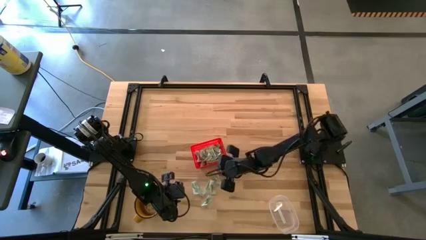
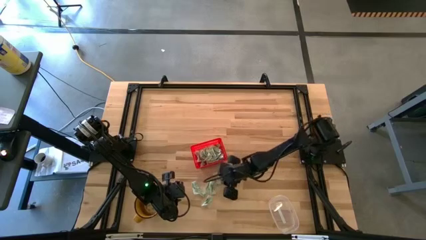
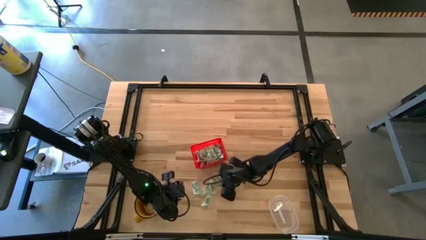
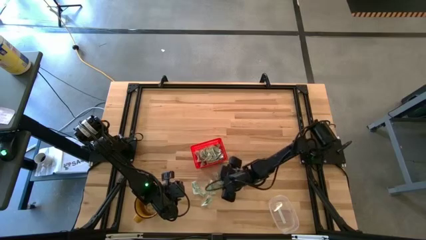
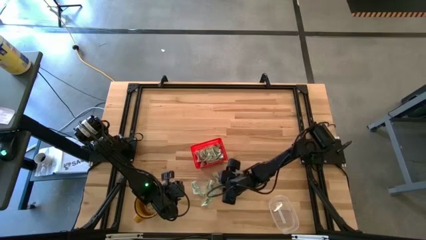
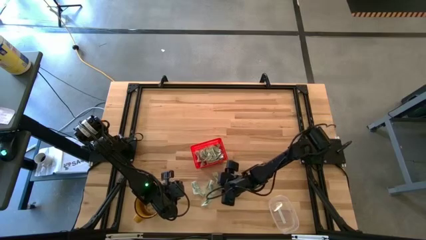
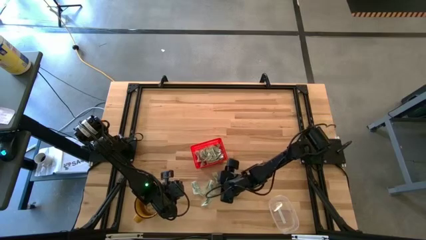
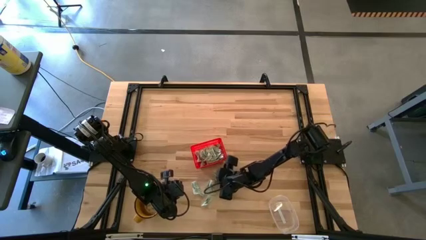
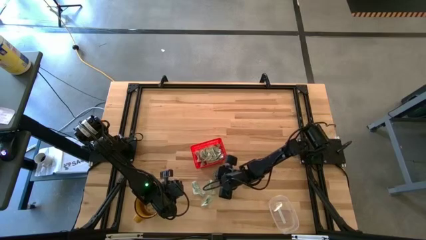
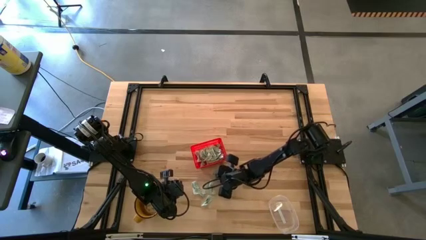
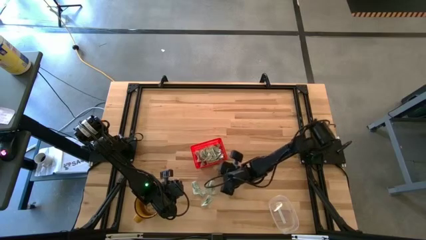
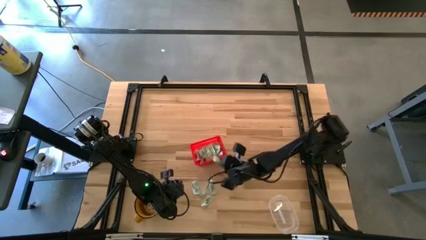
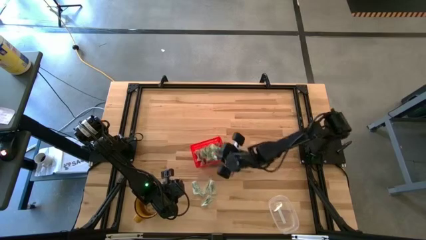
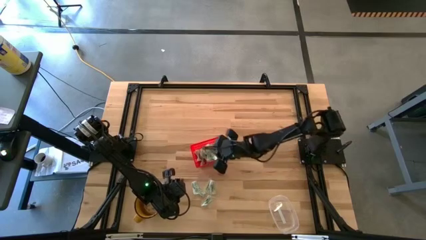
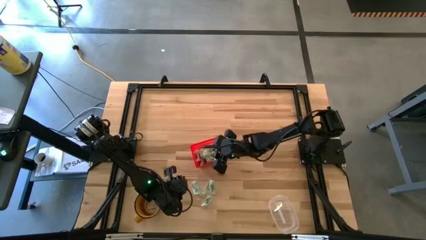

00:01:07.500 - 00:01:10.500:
Task: Pick and place Stevia / Truvia into bins
Put the stevia packet into the orange basket

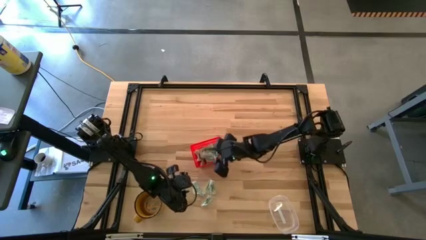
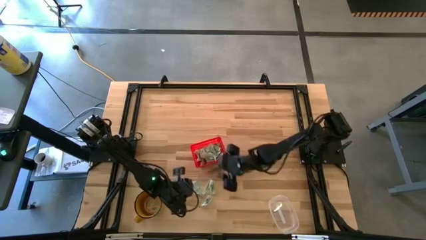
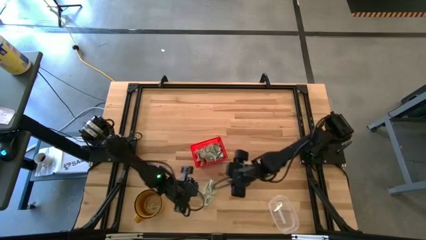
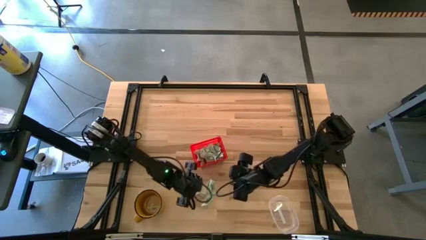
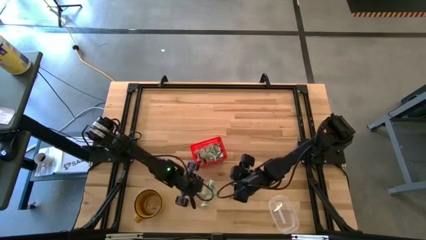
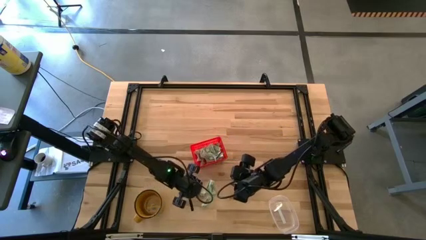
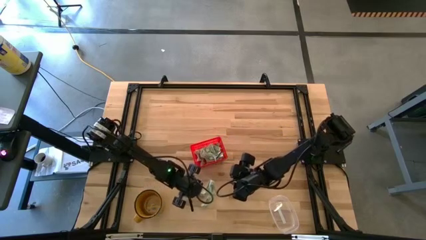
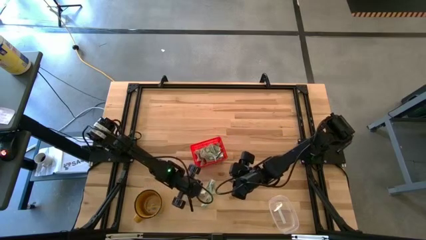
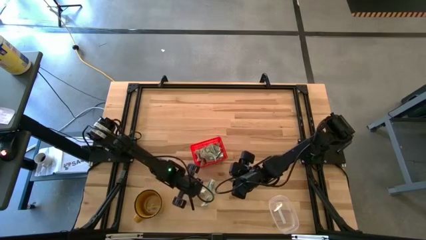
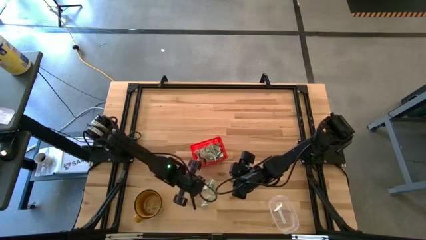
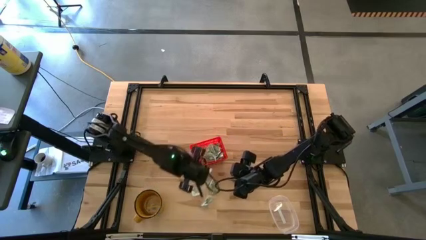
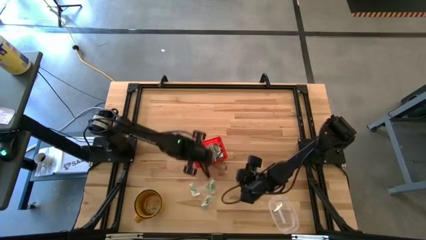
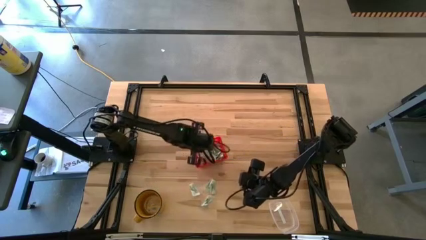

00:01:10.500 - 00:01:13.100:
Put the stevia packet into the orange basket

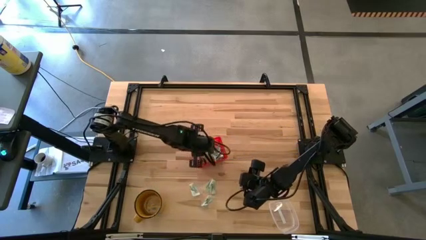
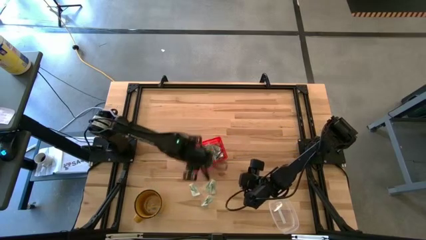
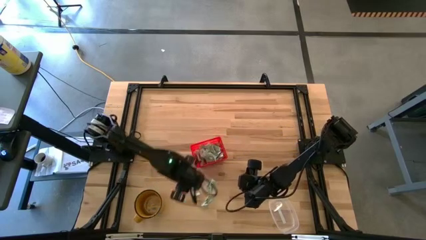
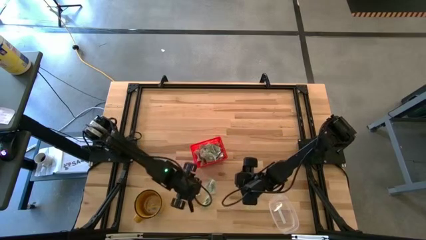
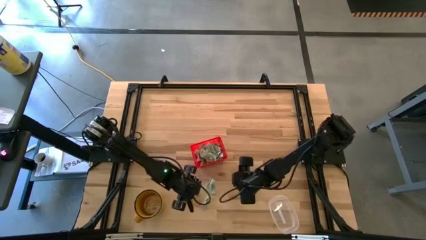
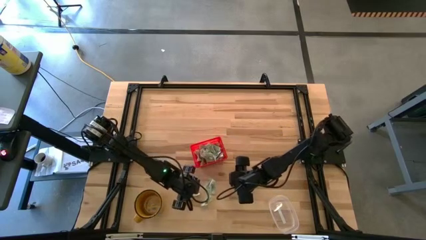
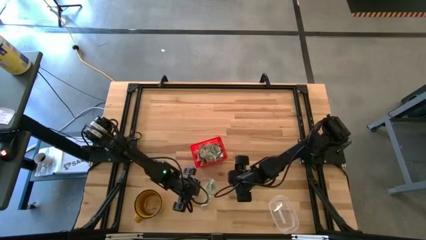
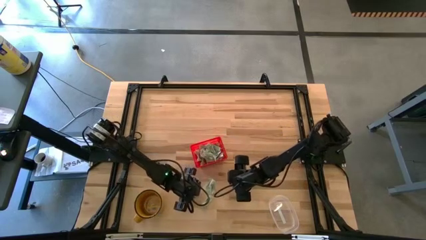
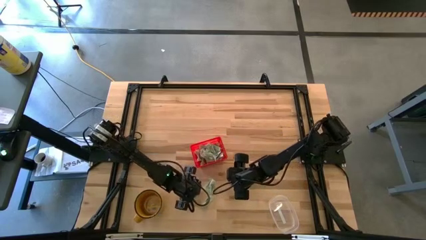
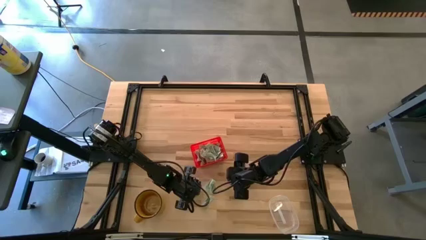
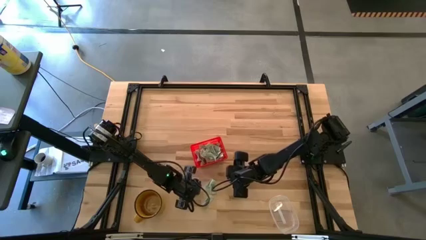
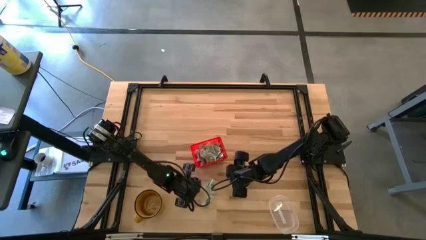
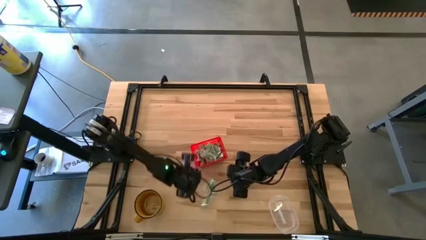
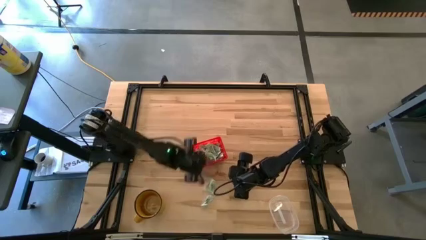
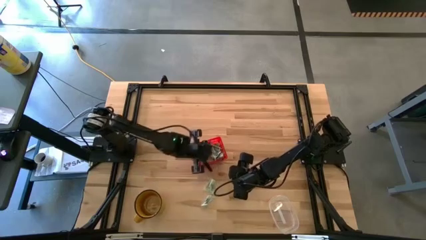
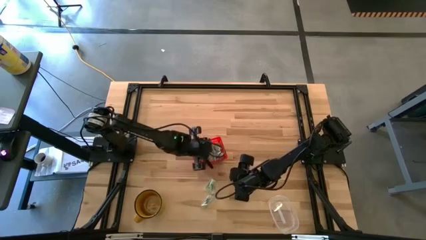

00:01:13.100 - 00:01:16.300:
Put the stevia packet into the orange basket

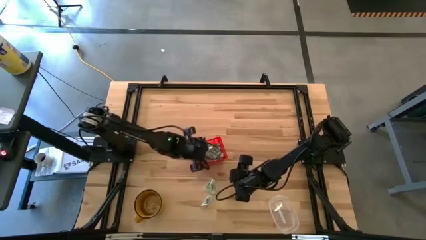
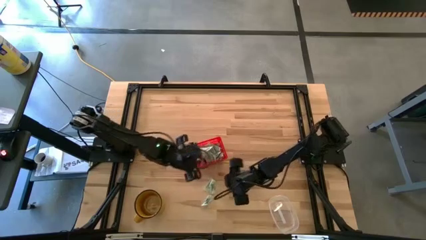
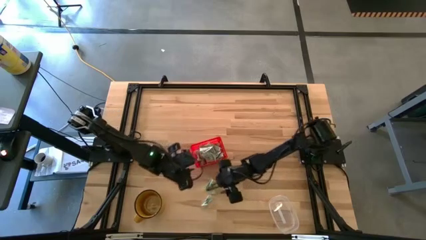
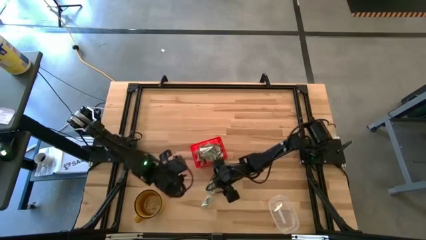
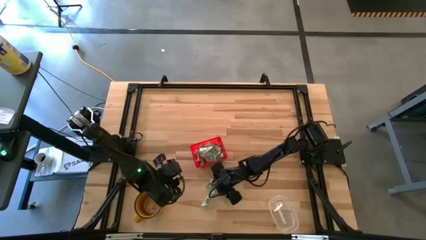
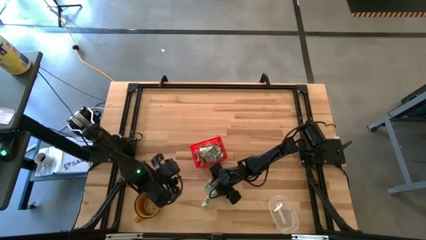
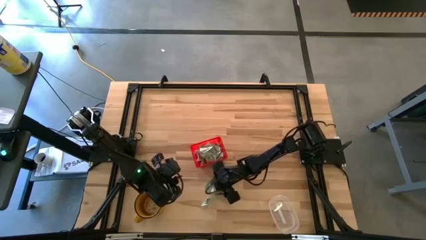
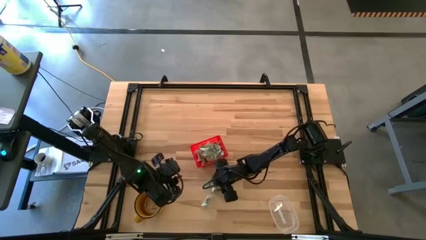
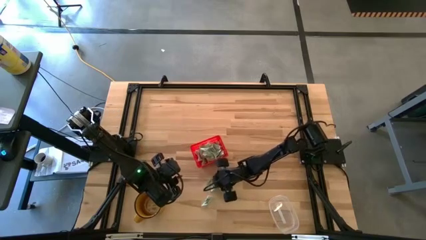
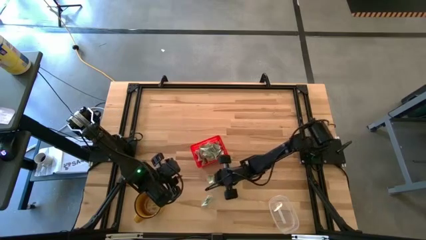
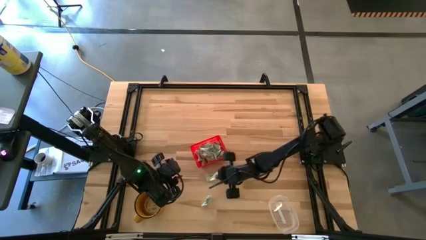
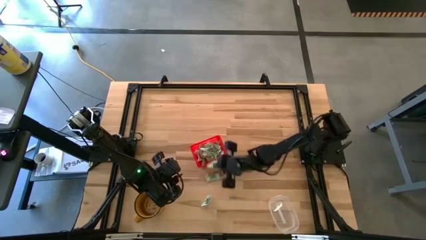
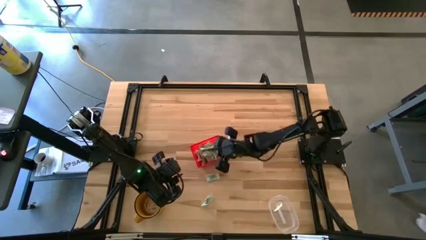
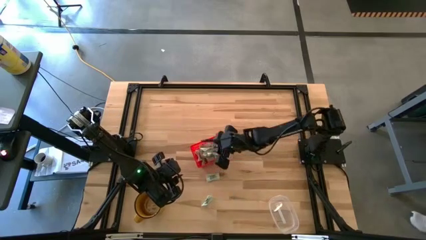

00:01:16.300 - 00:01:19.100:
Put the stevia packet into the orange basket

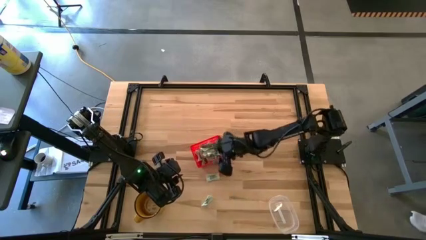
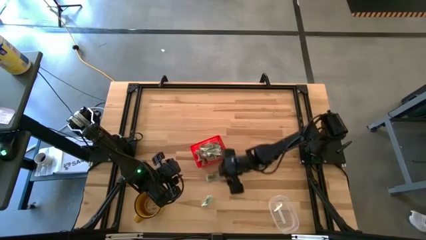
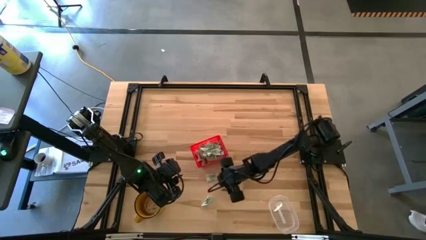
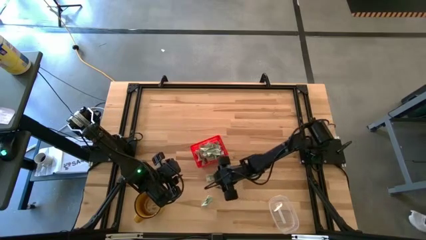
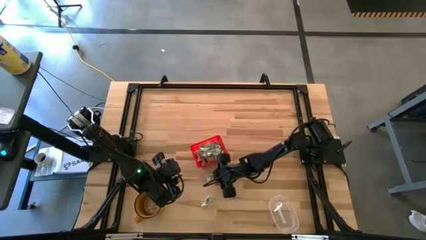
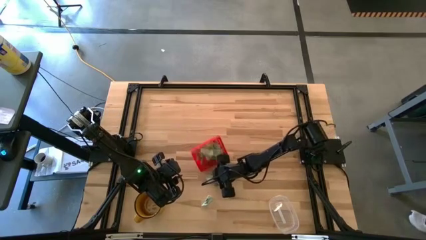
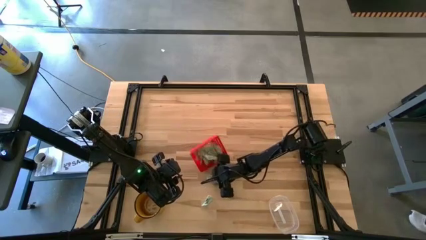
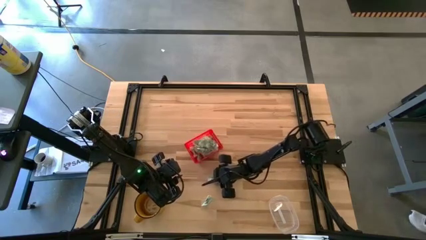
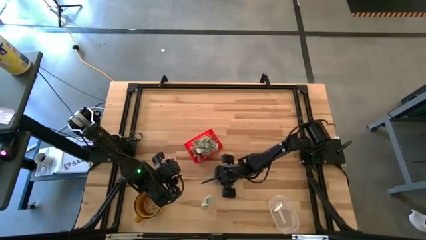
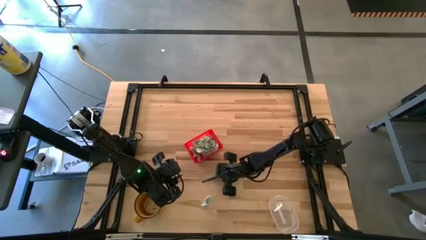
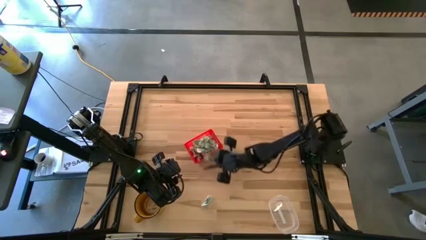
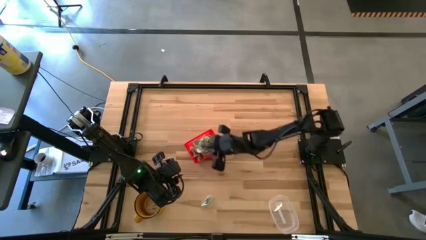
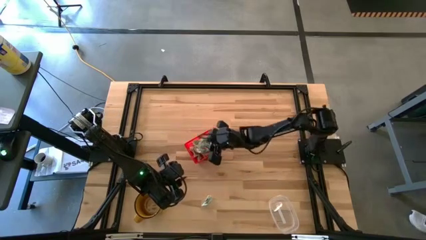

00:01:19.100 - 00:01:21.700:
Put the stevia packet into the orange basket

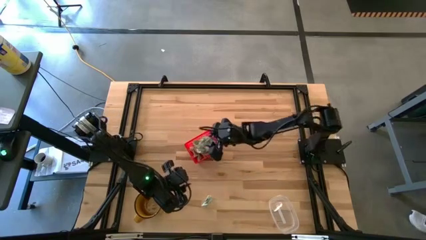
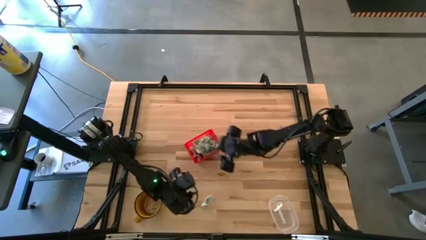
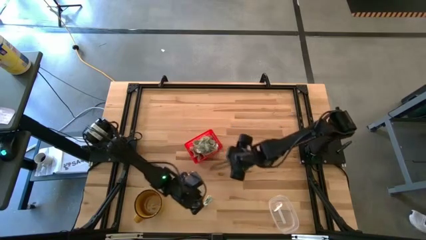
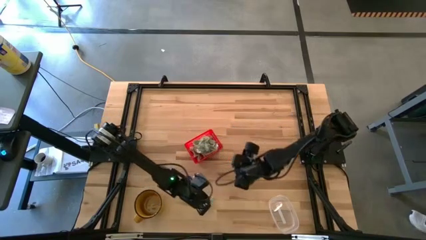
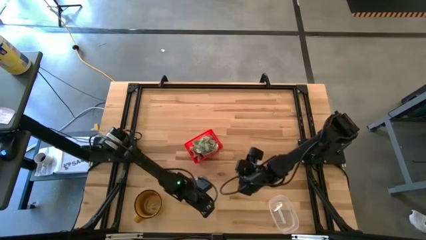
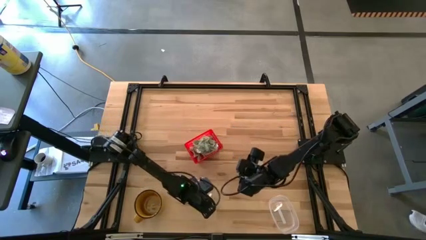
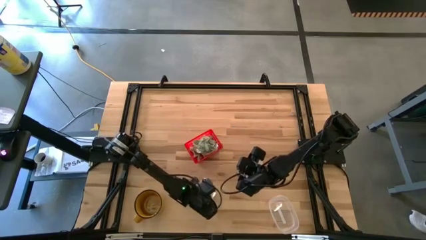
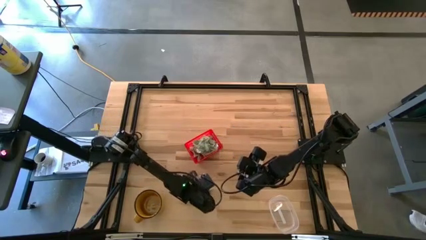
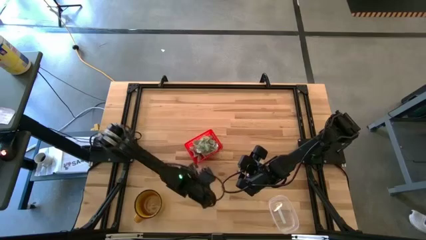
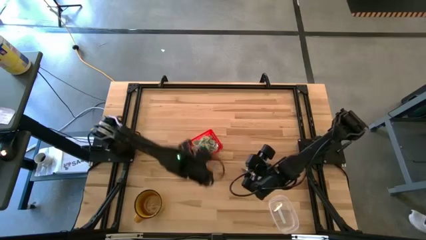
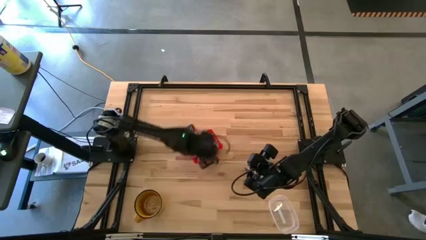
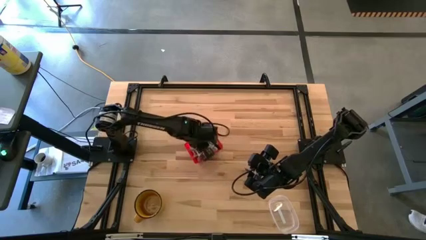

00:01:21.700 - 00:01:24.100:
Put the stevia packet into the orange basket
